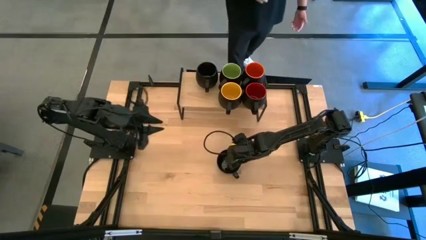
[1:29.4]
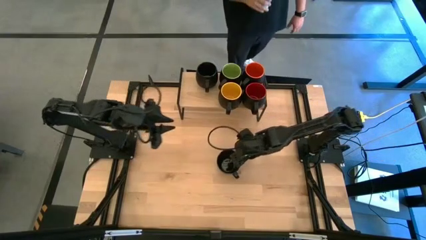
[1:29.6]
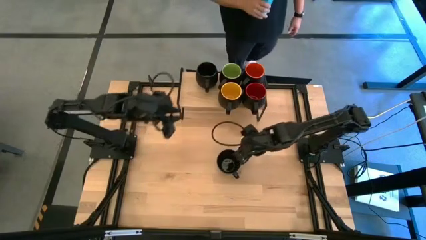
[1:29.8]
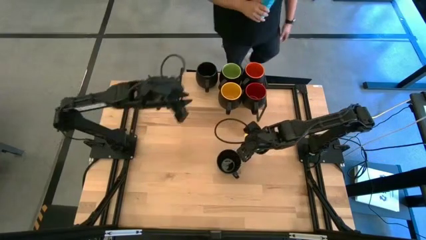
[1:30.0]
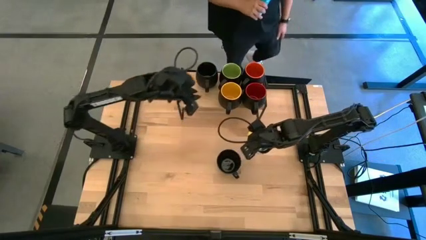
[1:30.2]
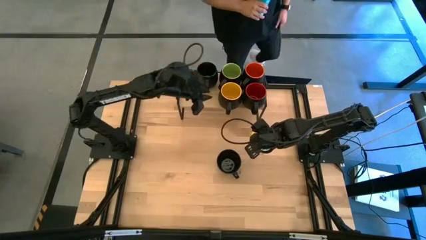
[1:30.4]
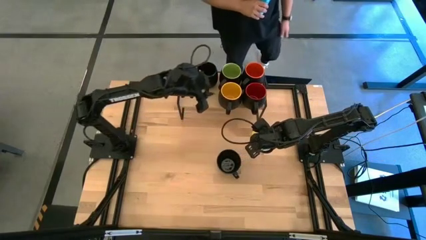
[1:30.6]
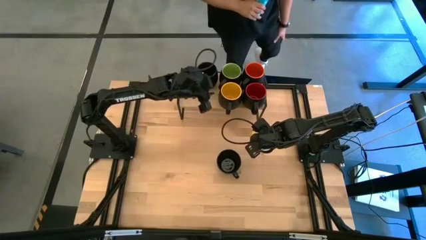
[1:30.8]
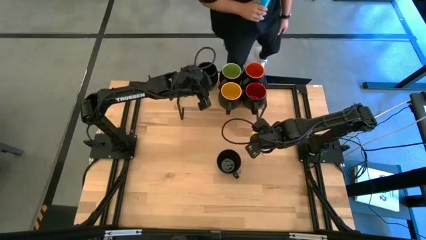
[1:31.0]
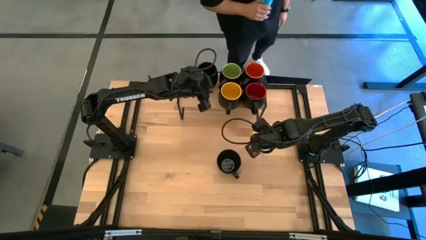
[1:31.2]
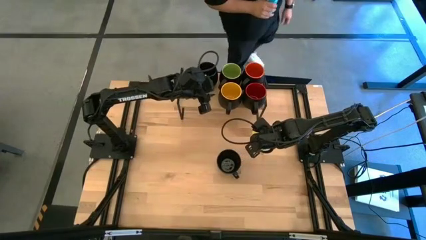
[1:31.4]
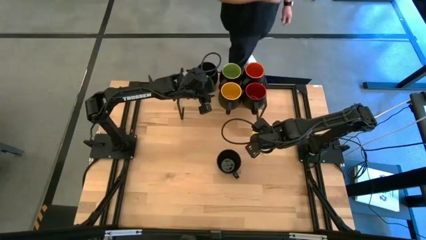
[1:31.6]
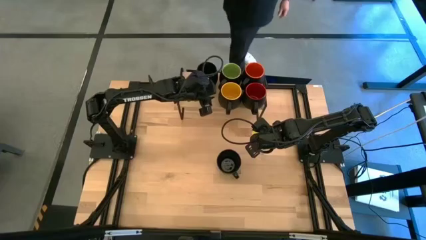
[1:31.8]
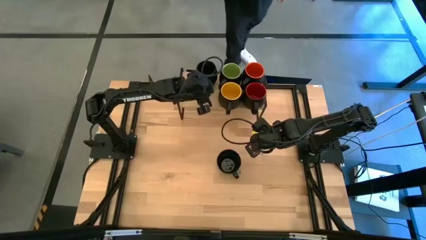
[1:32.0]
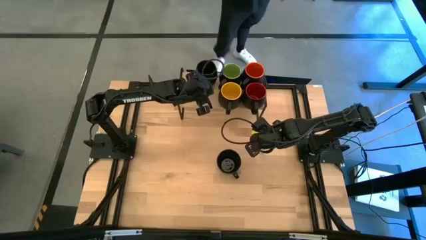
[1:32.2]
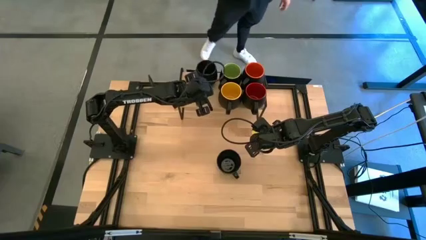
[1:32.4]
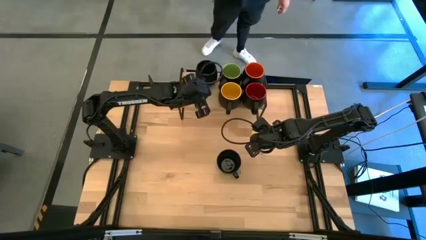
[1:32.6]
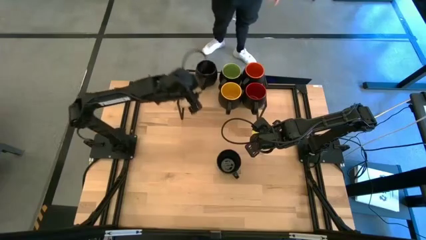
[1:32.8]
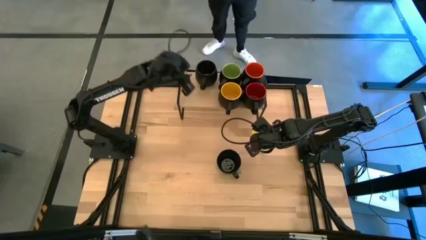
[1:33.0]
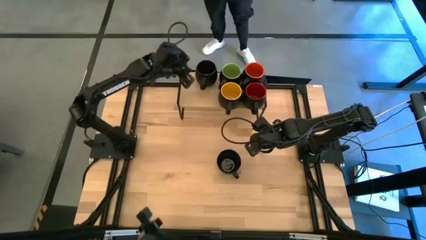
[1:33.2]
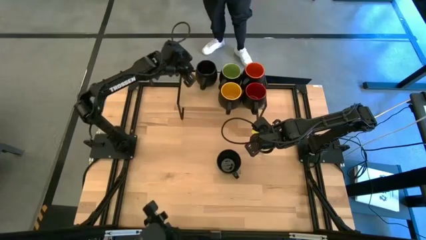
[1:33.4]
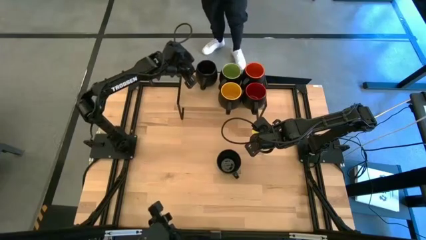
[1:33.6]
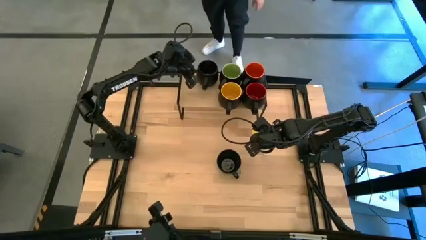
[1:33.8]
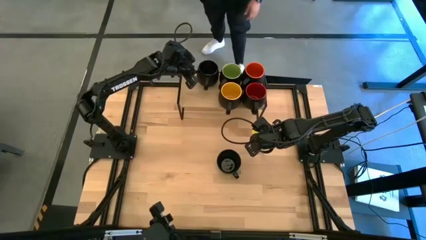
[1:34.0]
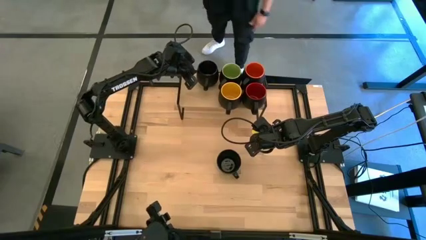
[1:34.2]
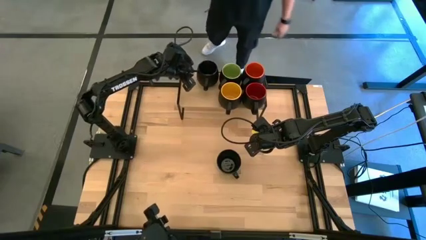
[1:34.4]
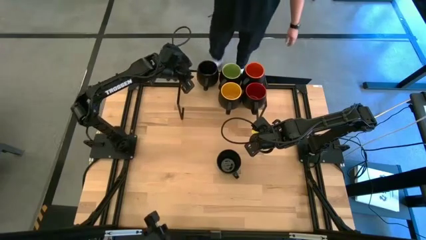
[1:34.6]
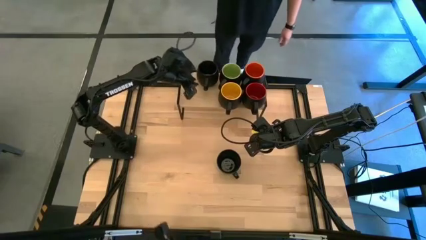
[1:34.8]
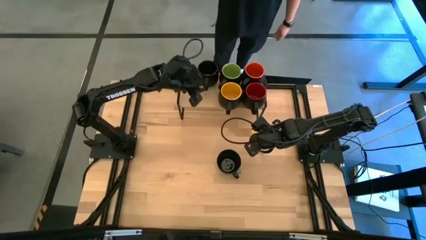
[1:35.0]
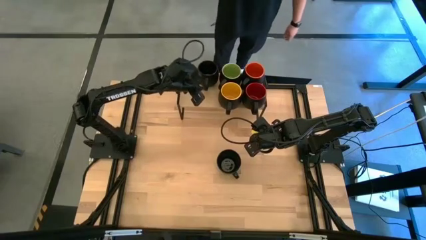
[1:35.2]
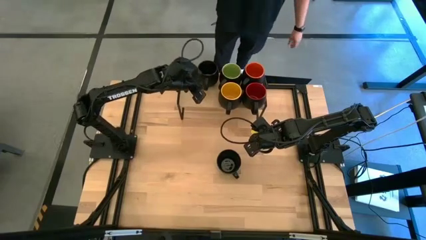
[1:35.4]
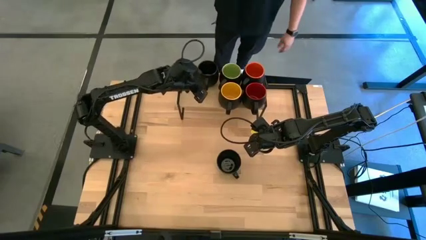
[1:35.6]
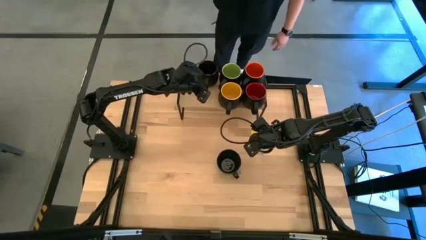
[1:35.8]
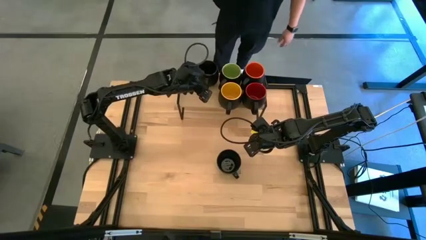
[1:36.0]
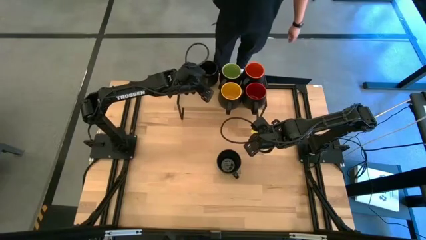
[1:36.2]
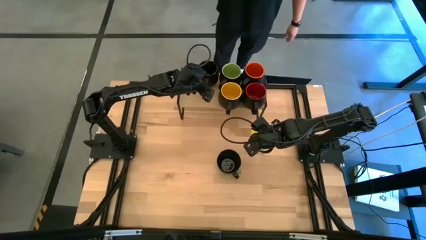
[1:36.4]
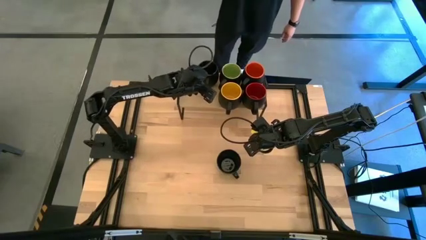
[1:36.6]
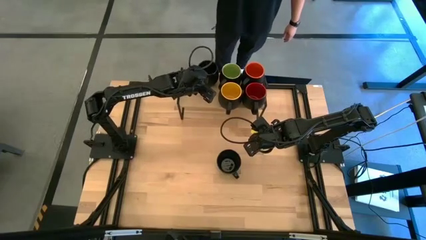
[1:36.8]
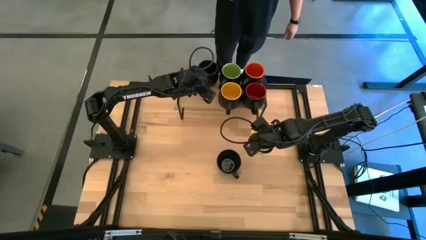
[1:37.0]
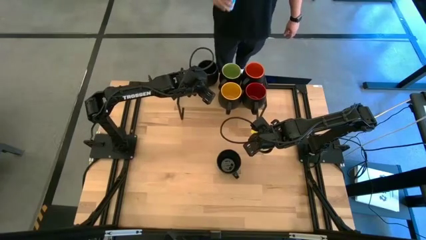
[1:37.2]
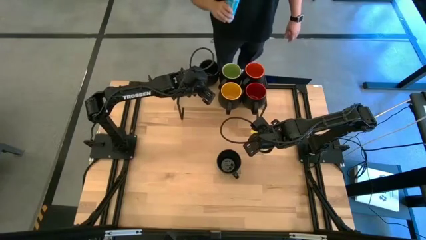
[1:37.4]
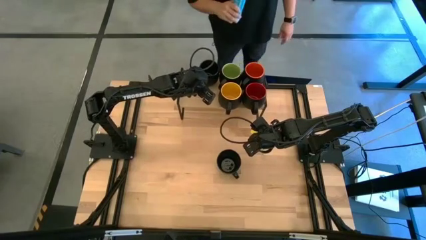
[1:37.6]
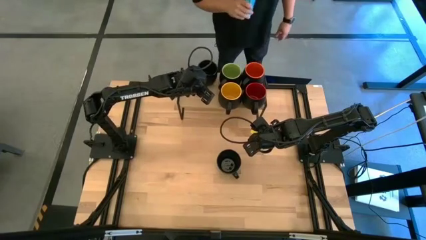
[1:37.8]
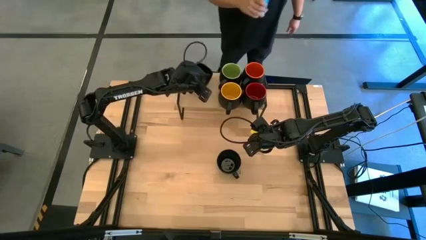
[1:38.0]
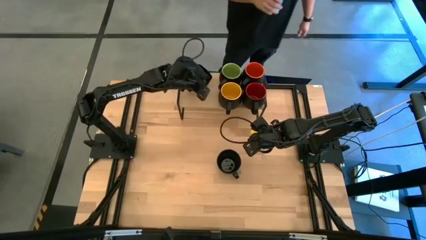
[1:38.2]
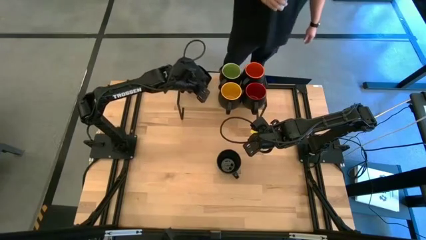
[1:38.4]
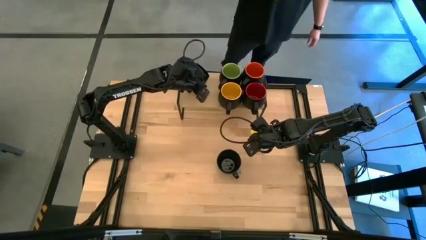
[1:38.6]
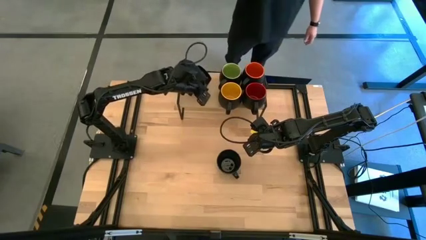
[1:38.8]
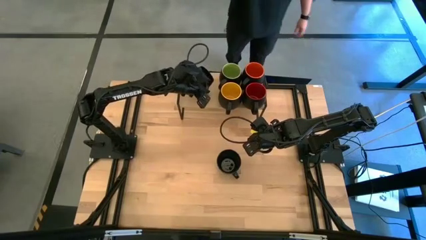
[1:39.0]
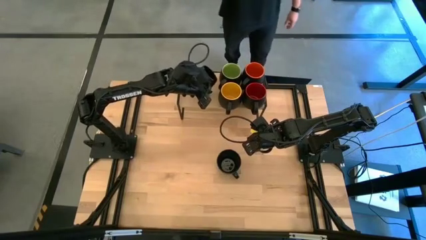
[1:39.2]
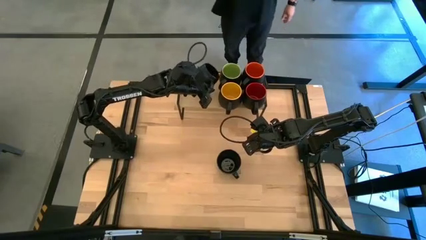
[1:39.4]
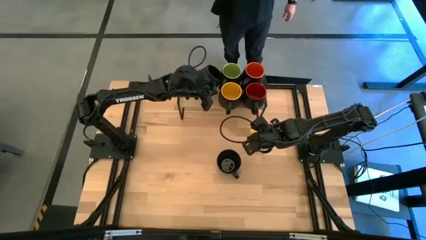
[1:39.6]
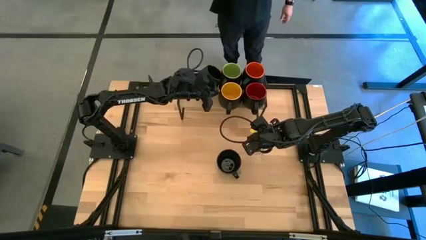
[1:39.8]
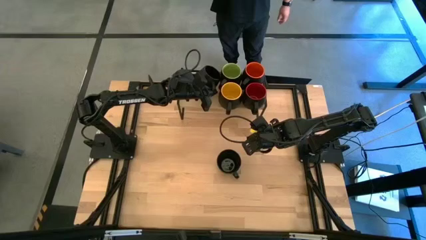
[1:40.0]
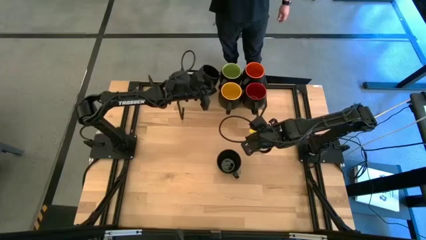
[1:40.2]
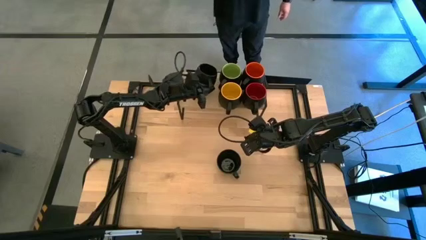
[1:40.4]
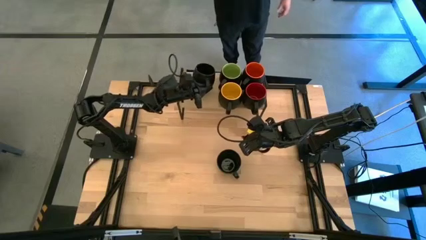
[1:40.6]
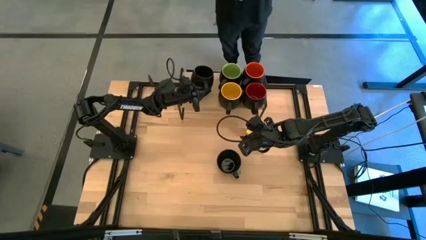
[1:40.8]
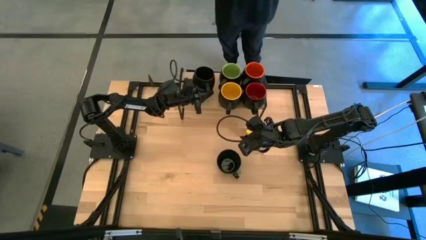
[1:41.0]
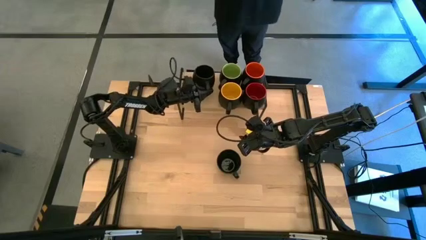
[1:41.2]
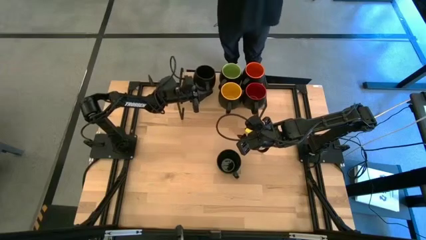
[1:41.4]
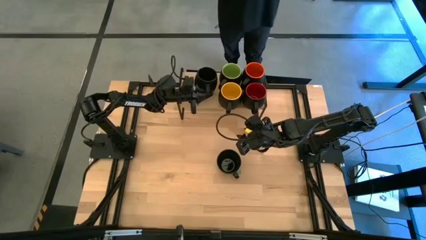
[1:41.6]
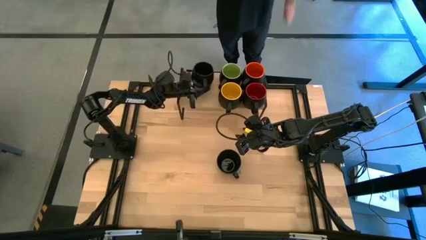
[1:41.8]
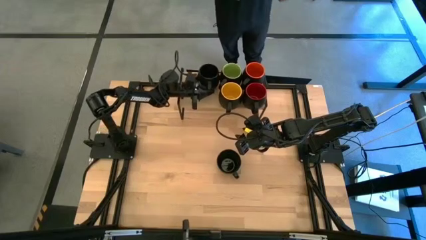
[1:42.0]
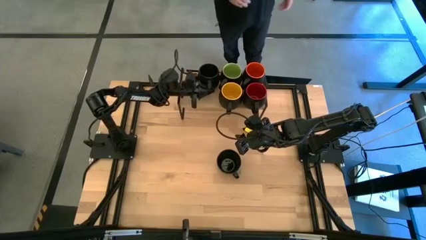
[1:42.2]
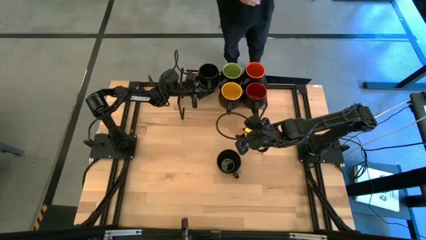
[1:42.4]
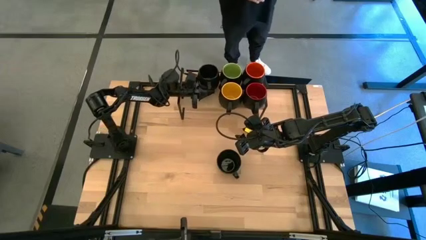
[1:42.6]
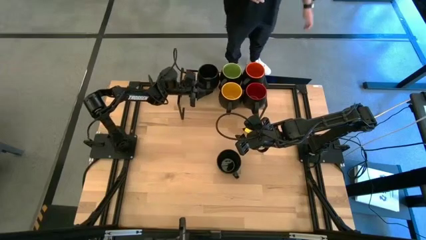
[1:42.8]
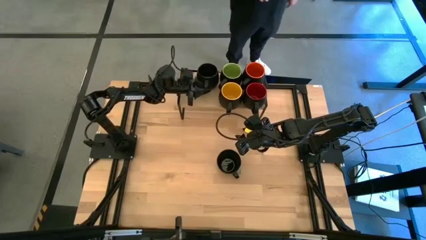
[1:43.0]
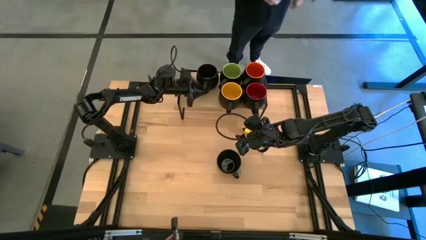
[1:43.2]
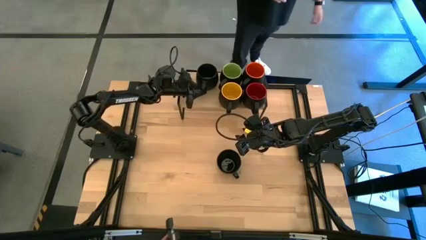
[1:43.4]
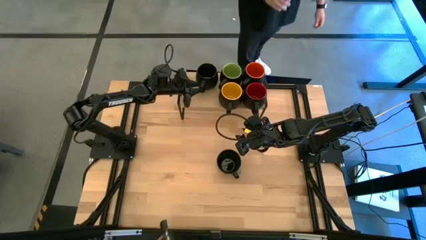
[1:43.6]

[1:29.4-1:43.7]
Task: Place coffee mugs
Adjust the black mug on the shelf

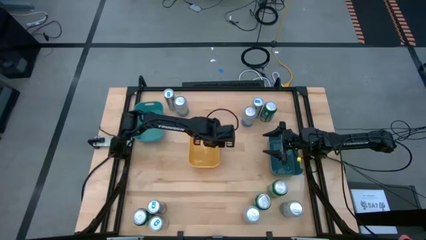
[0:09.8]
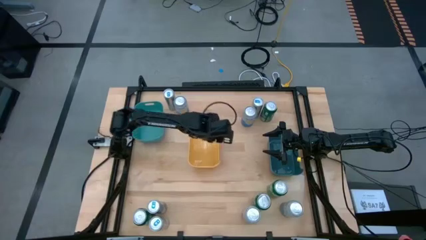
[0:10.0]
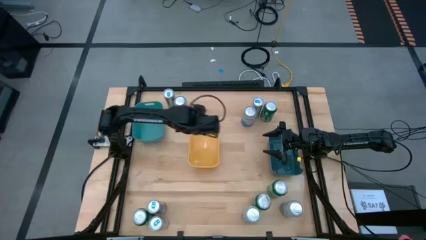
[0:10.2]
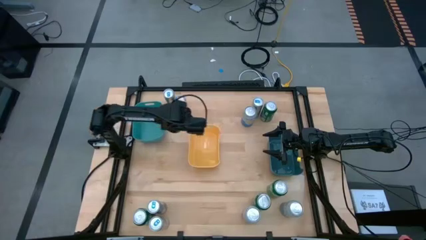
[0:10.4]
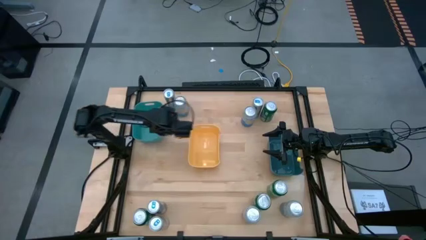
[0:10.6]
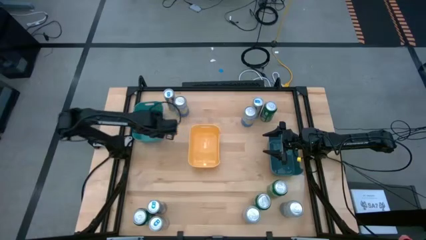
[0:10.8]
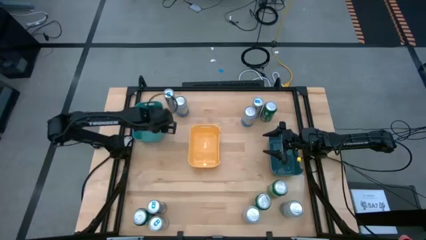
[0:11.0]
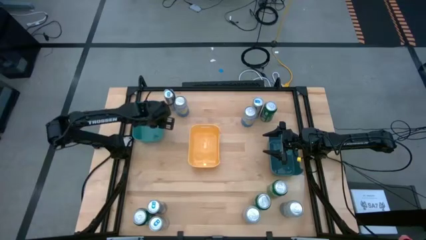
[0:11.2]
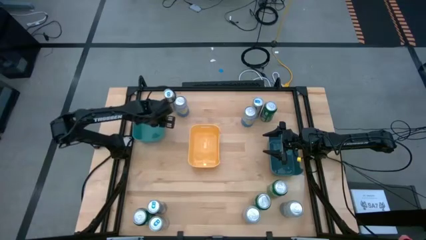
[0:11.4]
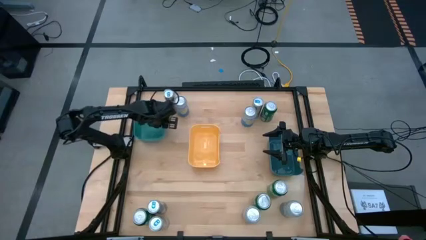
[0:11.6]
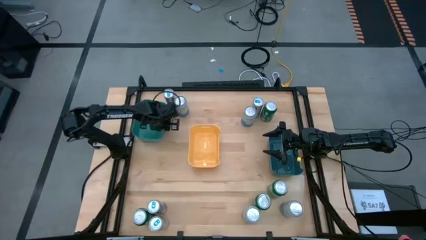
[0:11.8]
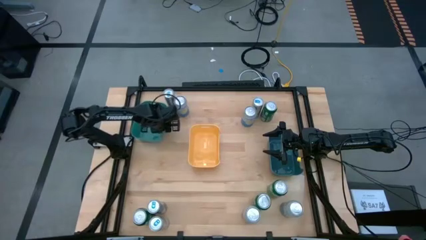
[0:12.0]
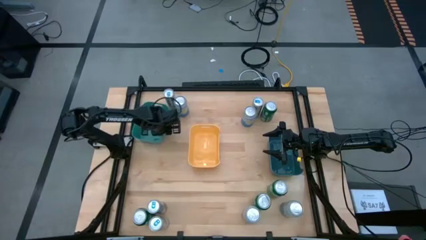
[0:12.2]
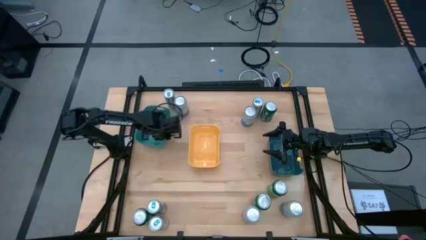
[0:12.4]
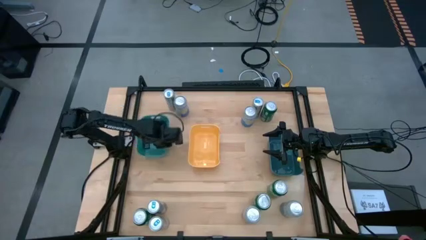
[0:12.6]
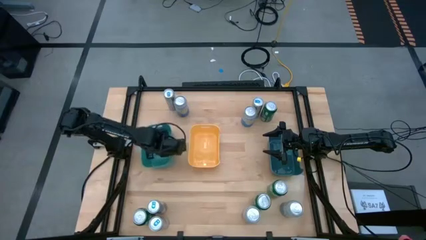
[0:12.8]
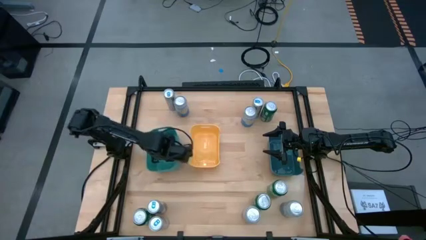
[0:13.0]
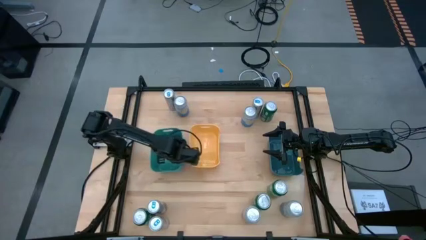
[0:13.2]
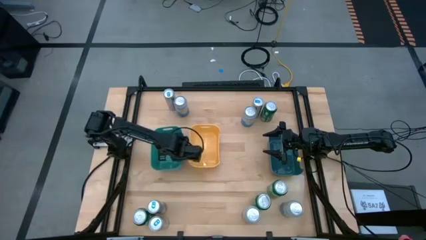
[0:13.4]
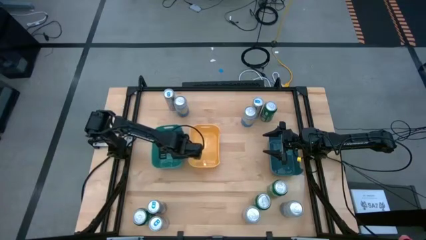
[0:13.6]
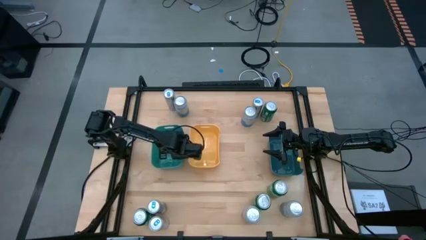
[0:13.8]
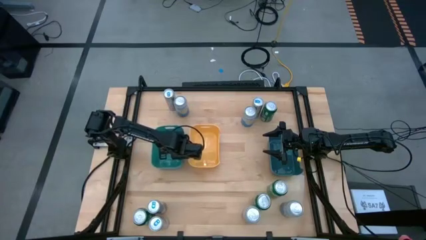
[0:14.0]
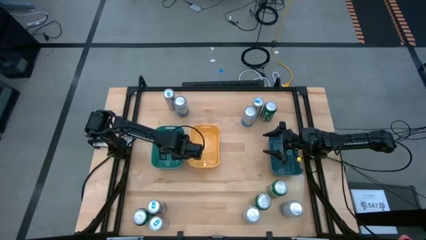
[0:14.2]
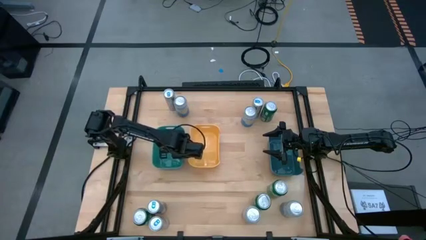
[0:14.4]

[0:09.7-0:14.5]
Task: Sort soda cans
Move the green bin to the left of the yellow bin
